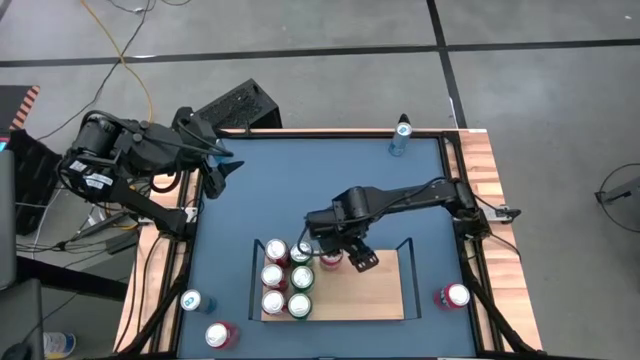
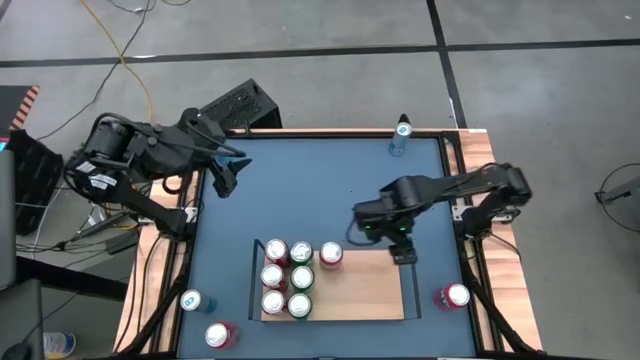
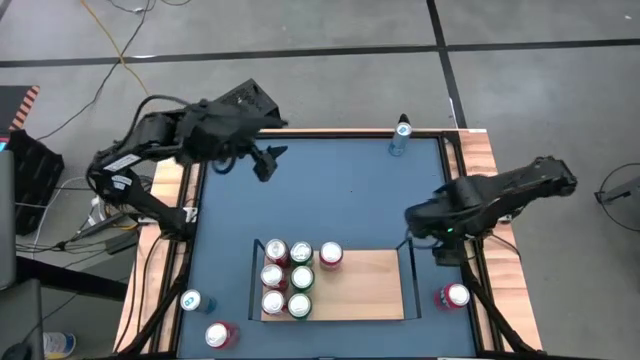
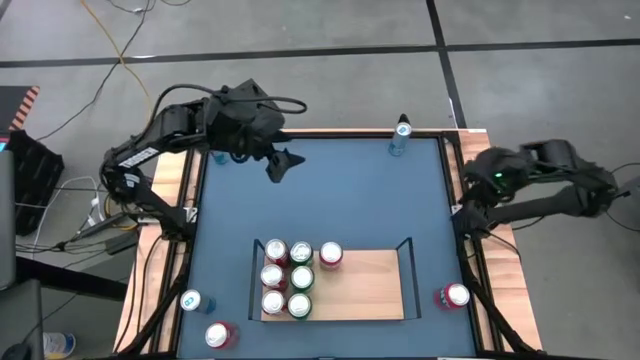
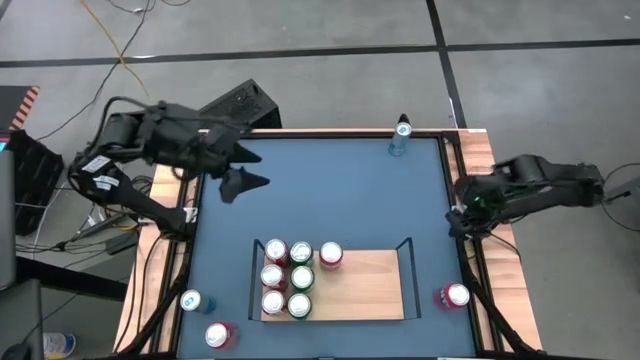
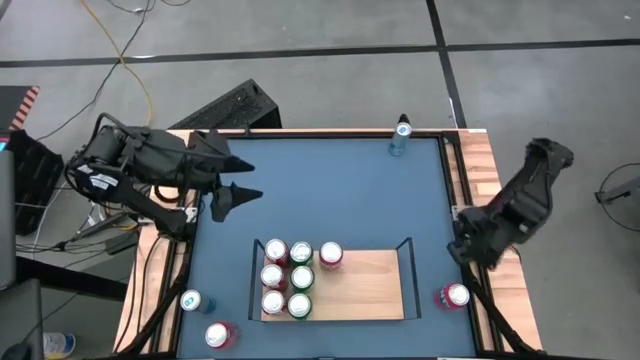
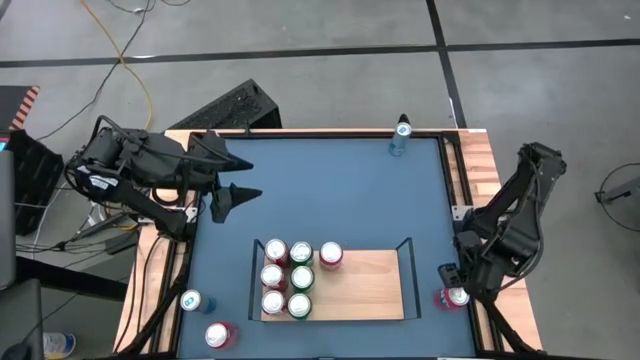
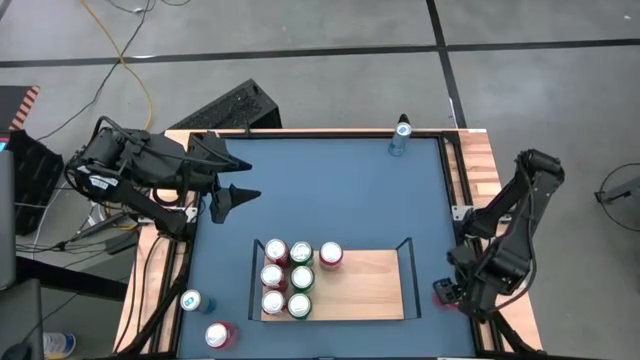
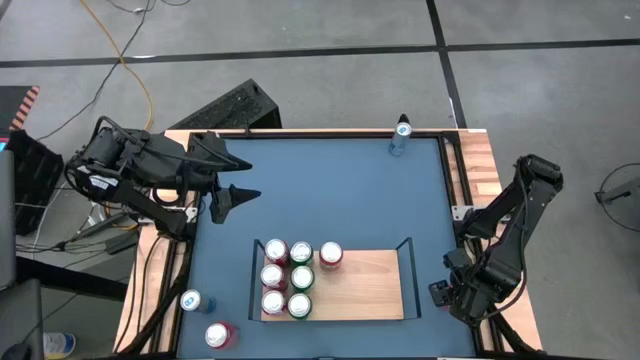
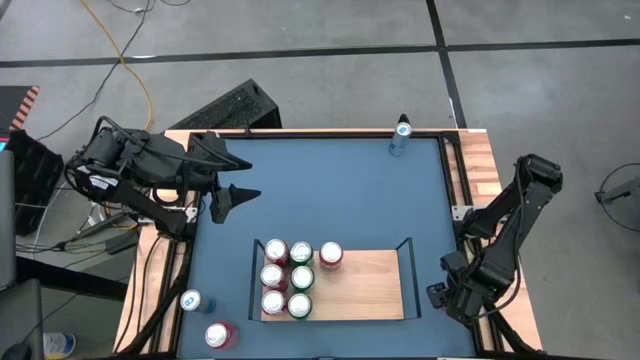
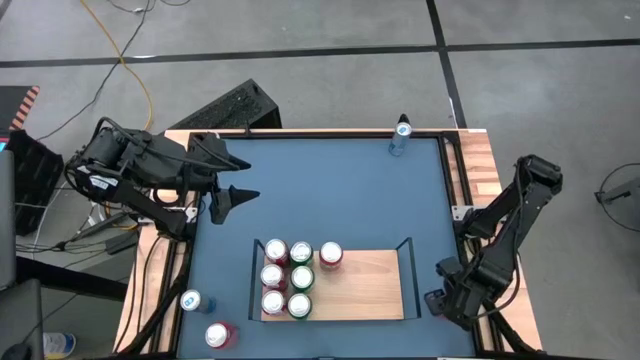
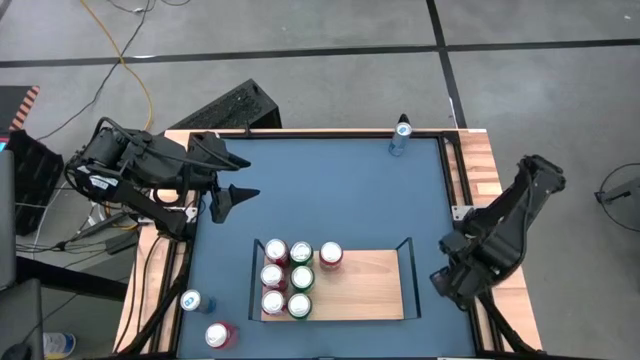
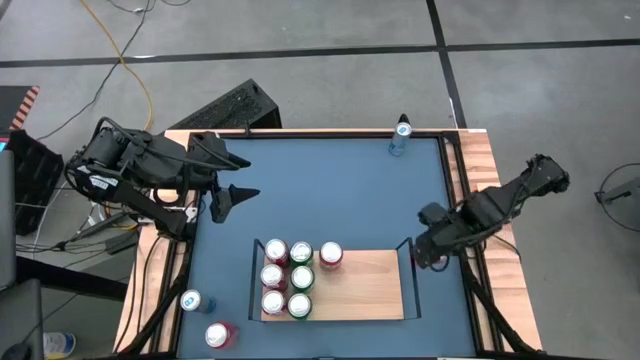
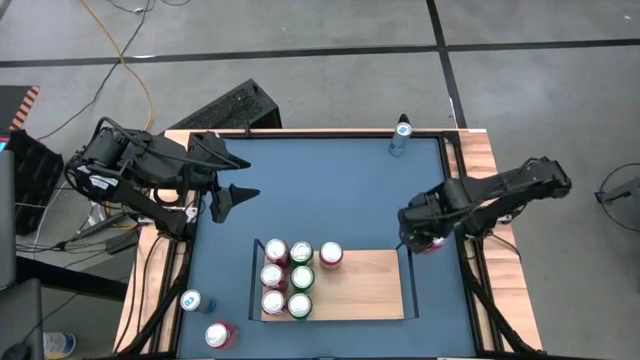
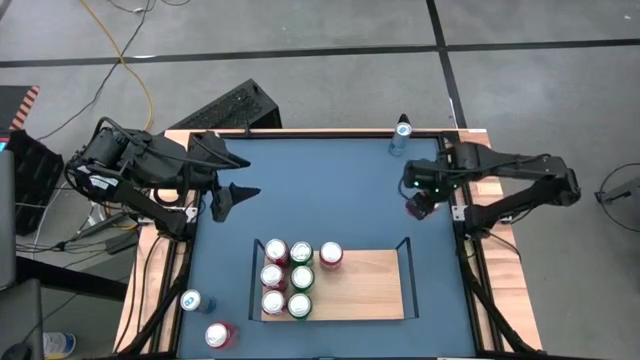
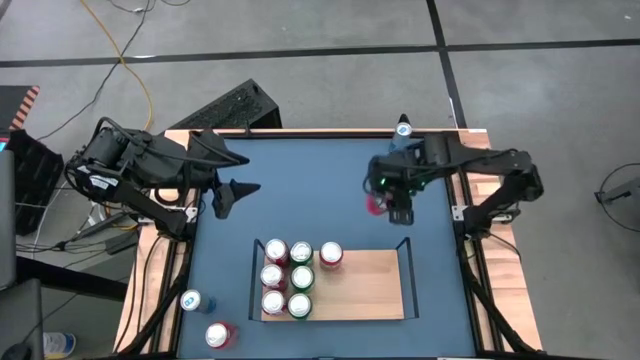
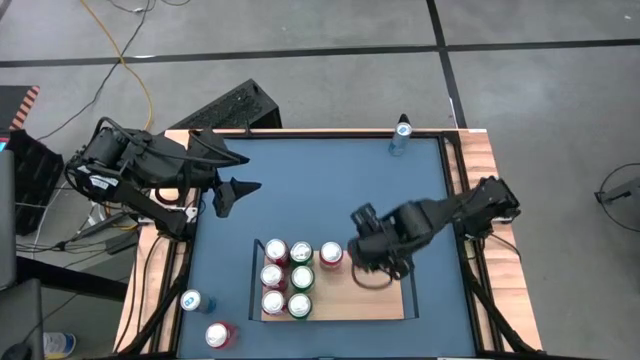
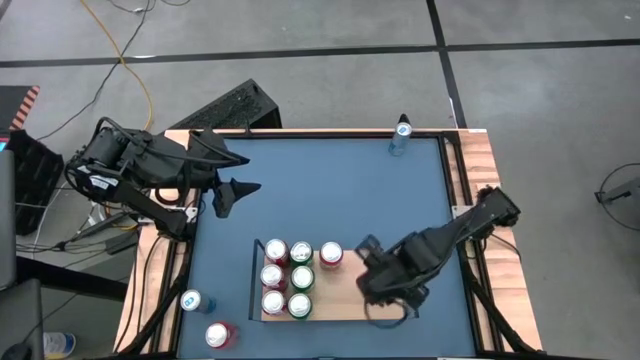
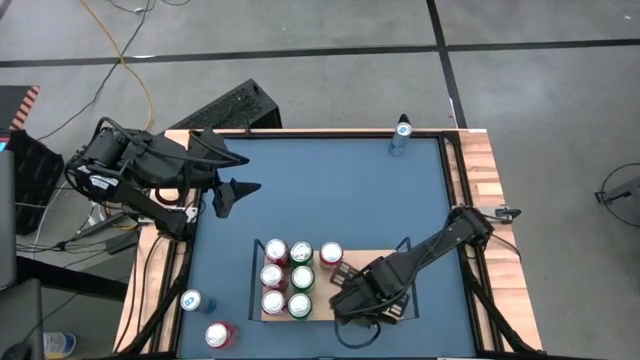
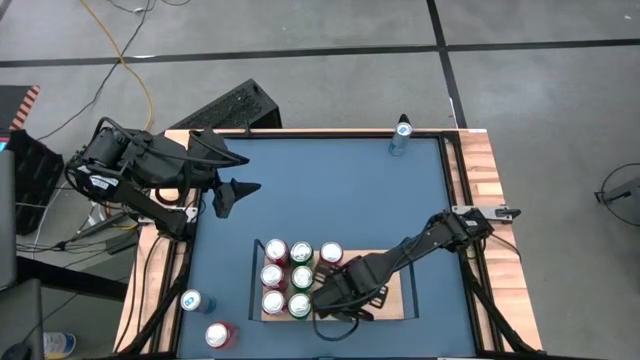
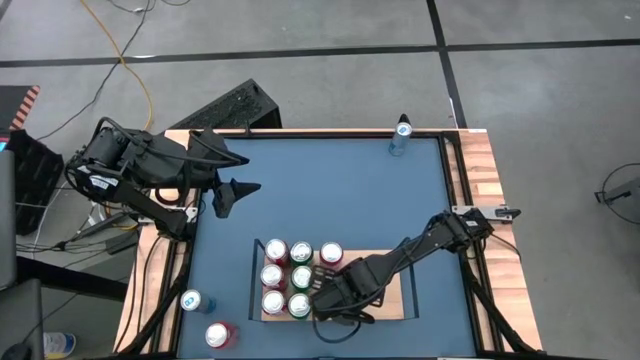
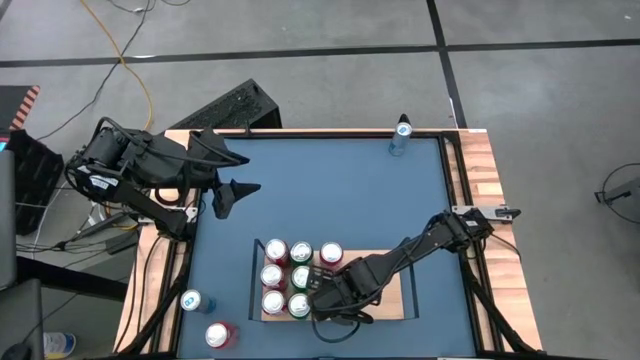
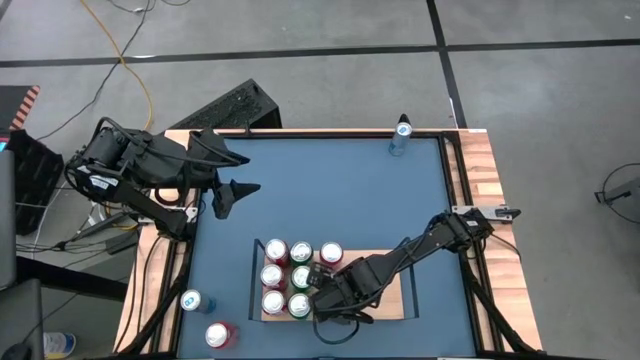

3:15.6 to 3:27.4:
Task: Place canned beverage on shelf
Put the right orange soda can on the shelf aligned with the other orange soda can

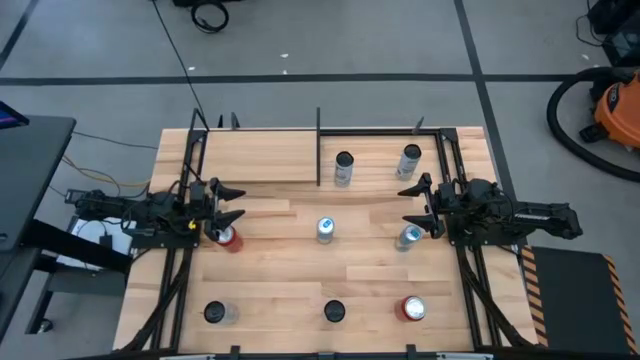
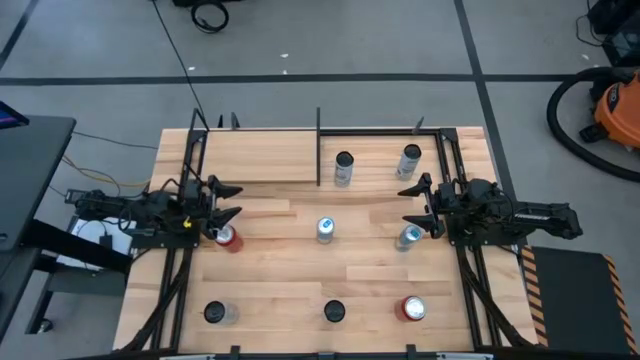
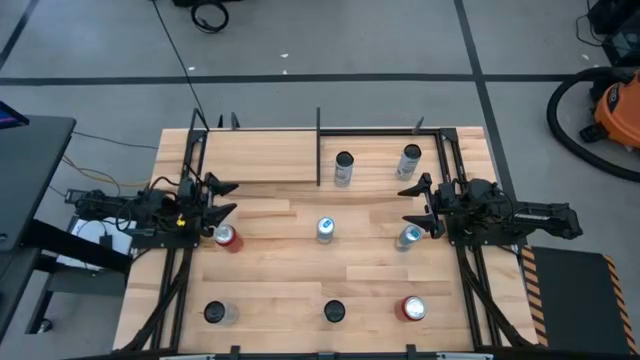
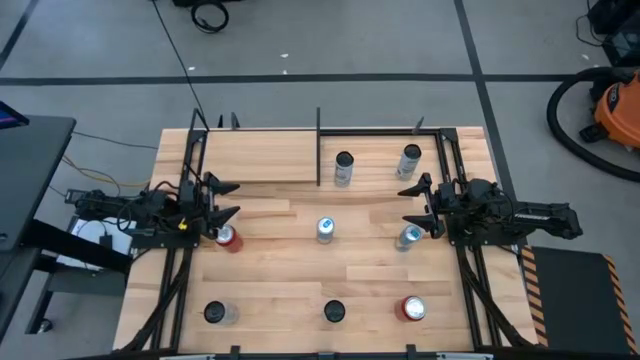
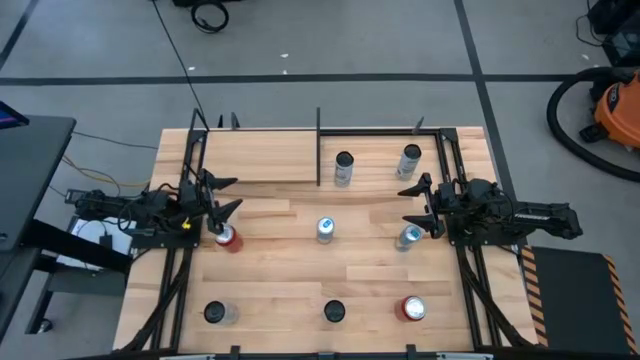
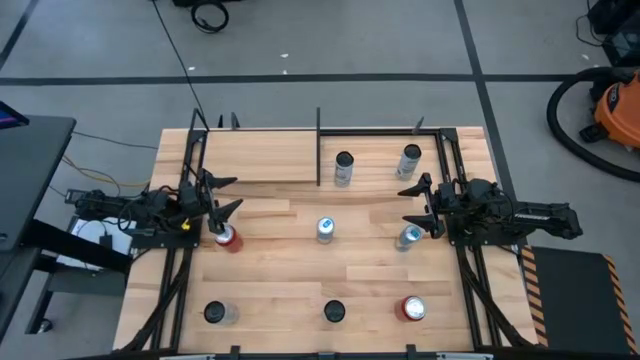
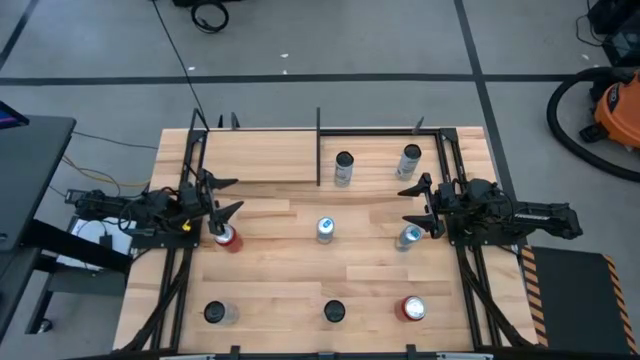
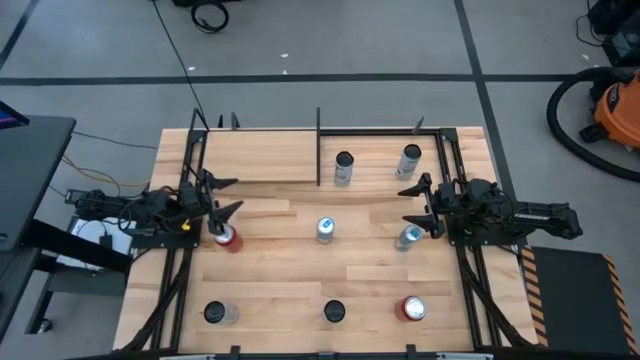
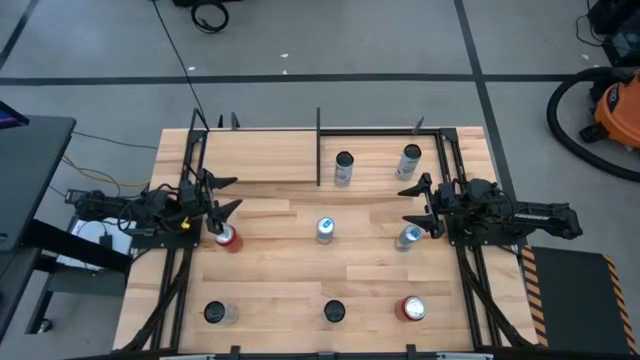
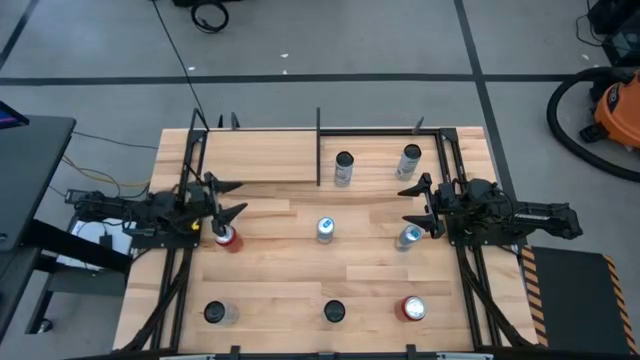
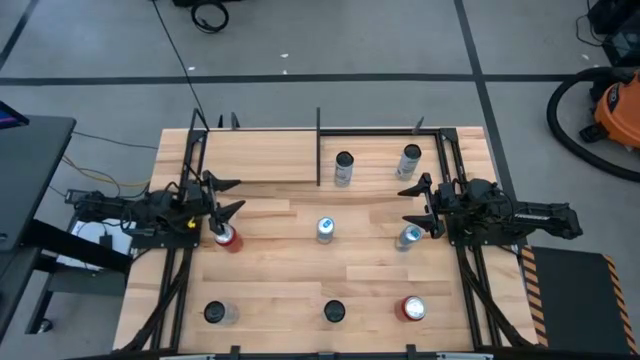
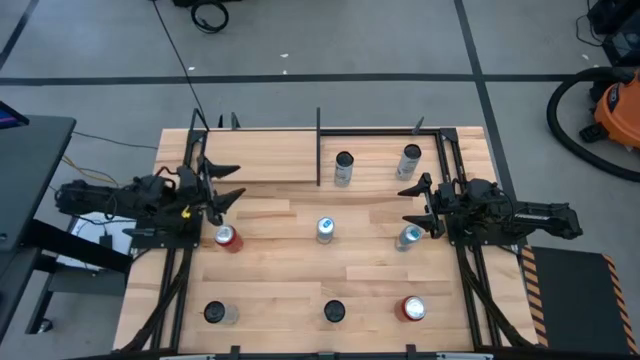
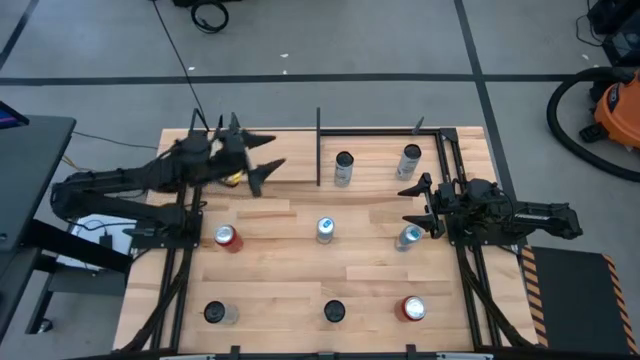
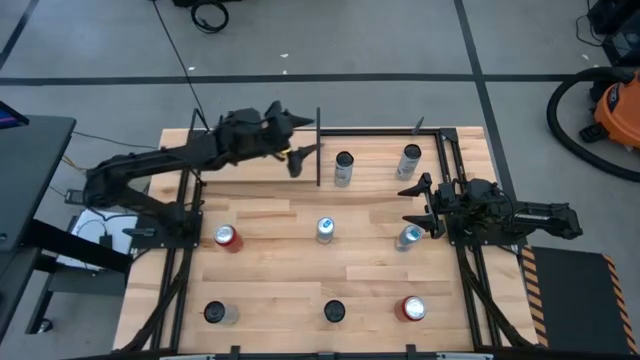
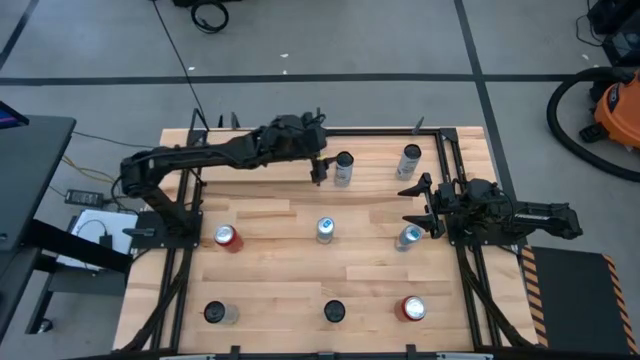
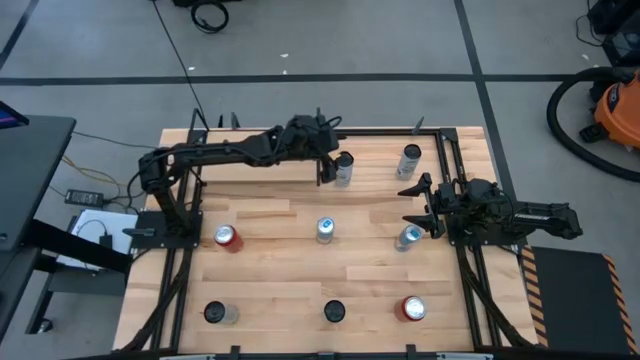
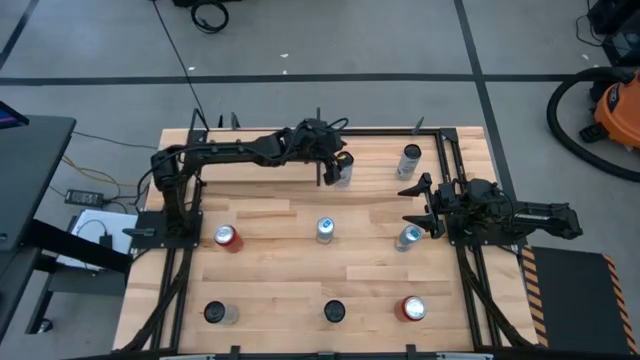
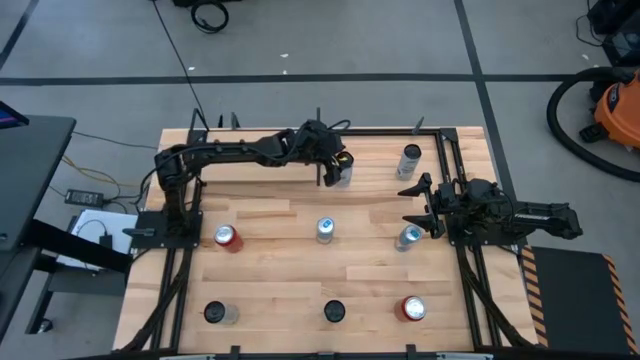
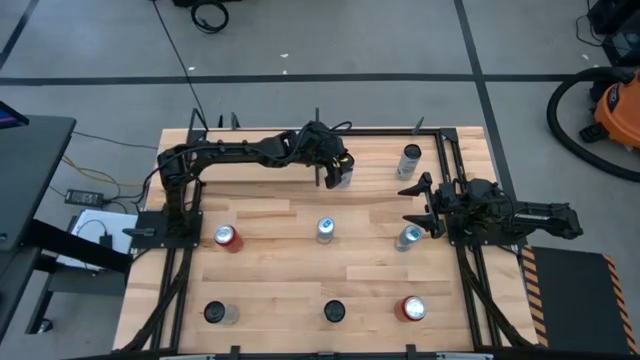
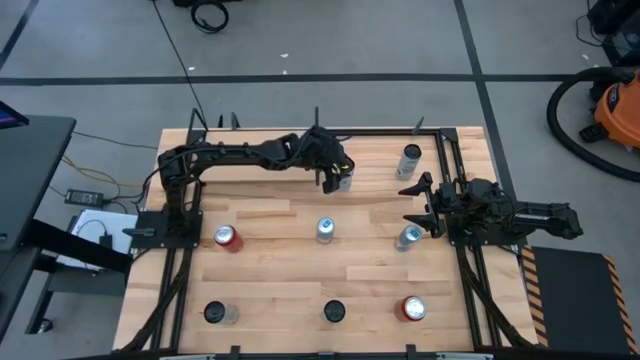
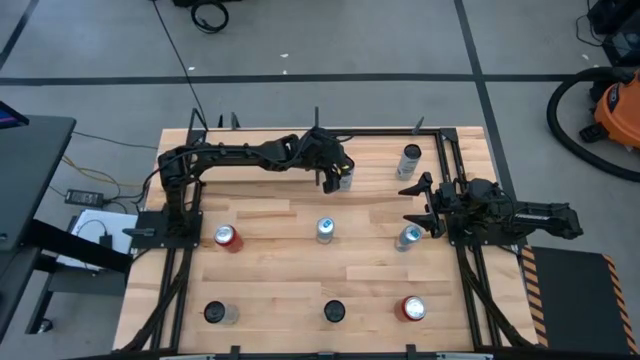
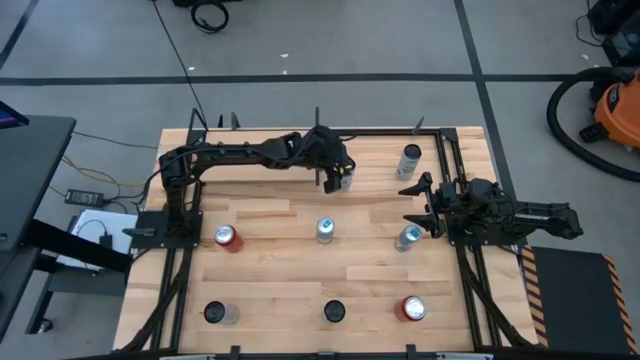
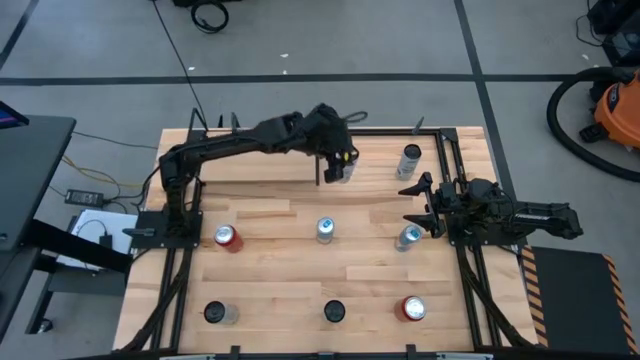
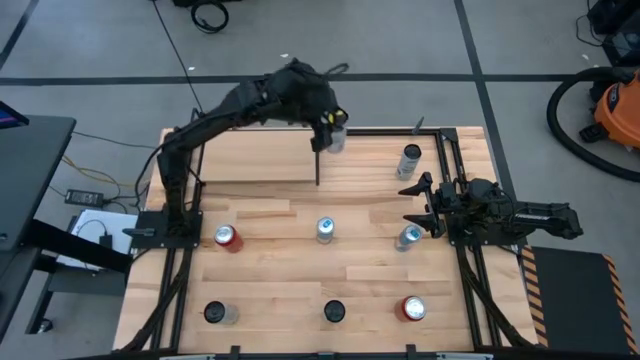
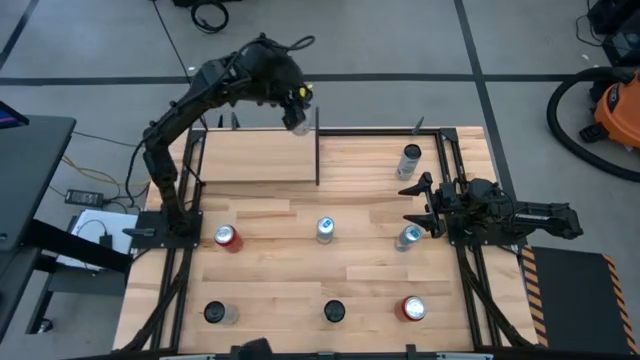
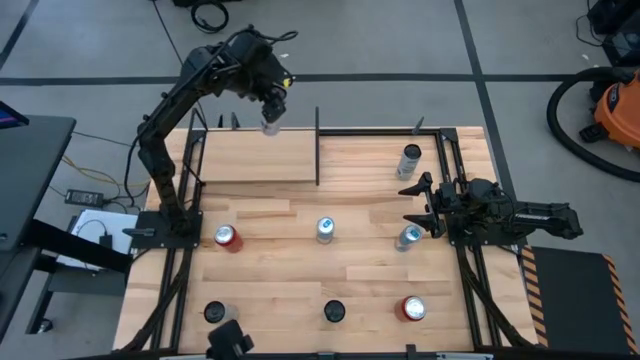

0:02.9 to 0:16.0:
Task: Place canned beverage on shelf
Put the blue-white soda can on the shelf
